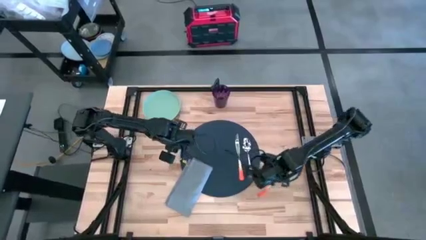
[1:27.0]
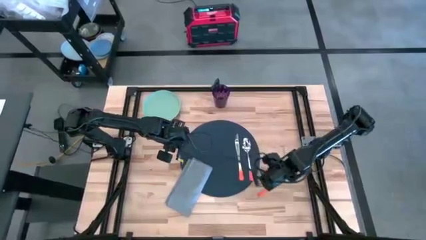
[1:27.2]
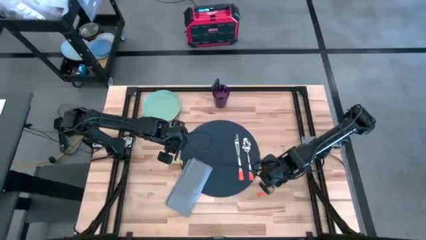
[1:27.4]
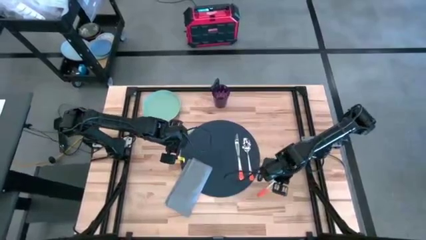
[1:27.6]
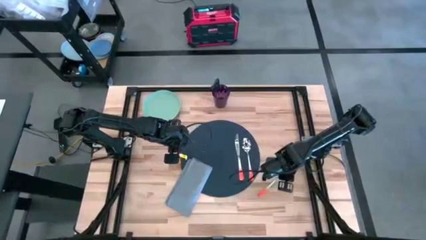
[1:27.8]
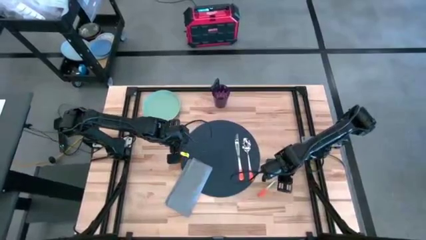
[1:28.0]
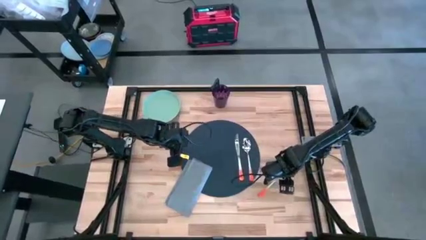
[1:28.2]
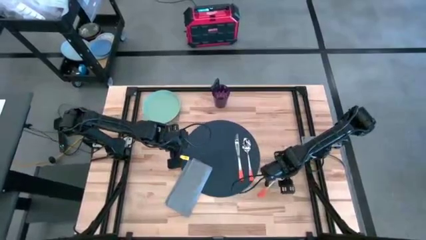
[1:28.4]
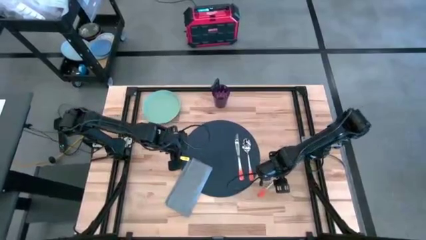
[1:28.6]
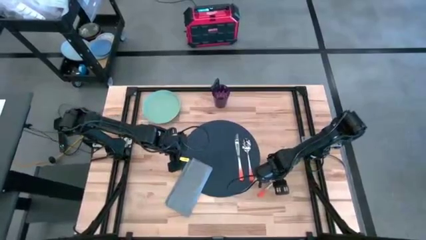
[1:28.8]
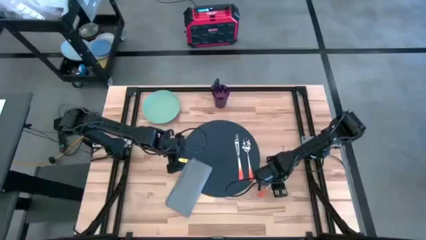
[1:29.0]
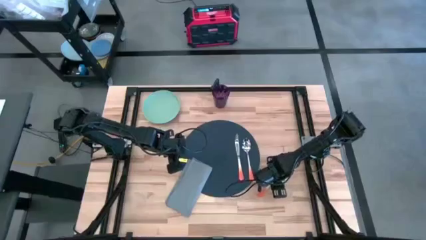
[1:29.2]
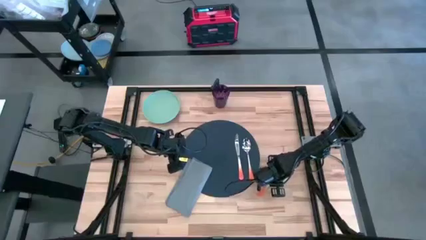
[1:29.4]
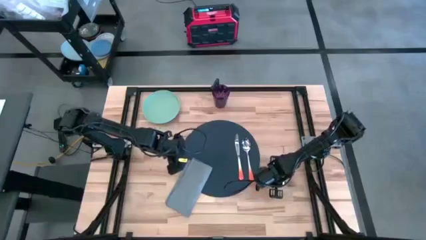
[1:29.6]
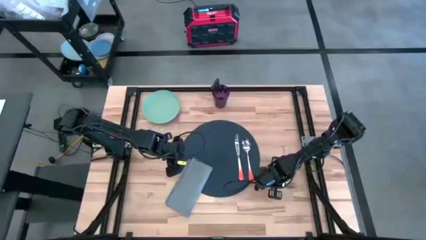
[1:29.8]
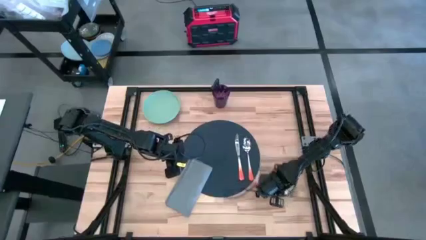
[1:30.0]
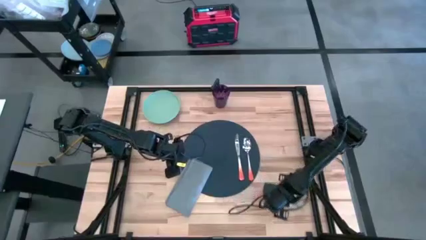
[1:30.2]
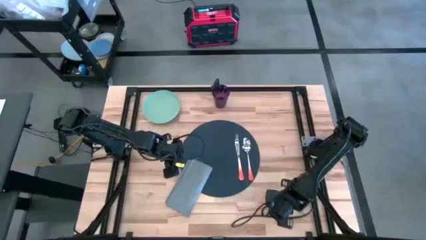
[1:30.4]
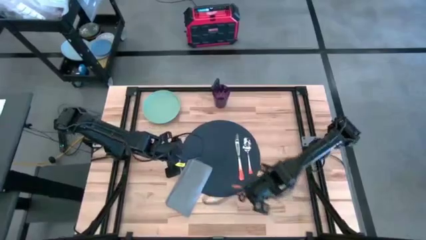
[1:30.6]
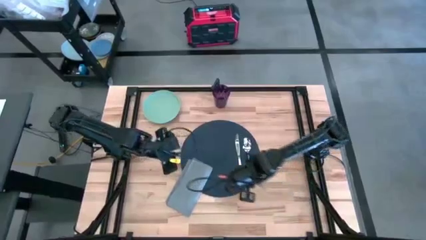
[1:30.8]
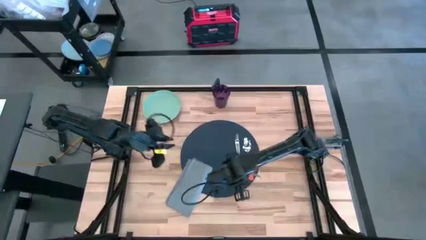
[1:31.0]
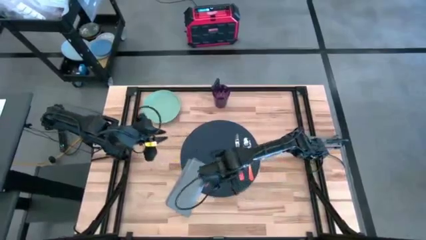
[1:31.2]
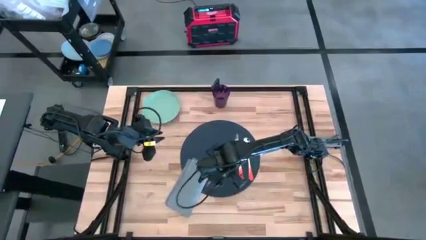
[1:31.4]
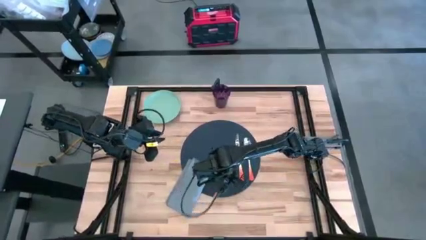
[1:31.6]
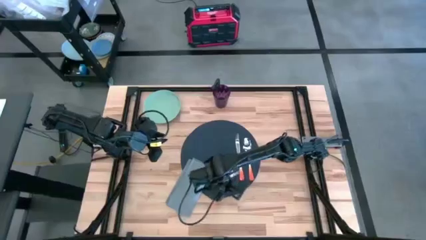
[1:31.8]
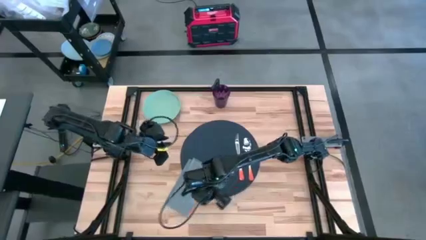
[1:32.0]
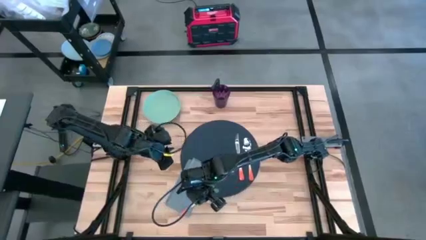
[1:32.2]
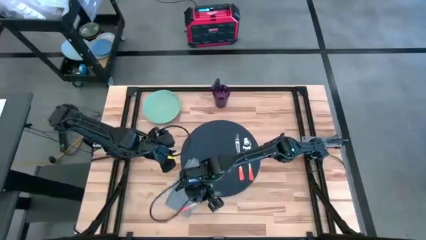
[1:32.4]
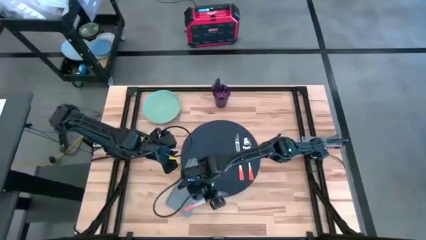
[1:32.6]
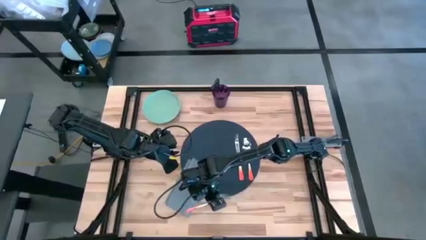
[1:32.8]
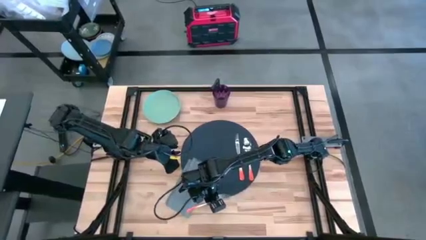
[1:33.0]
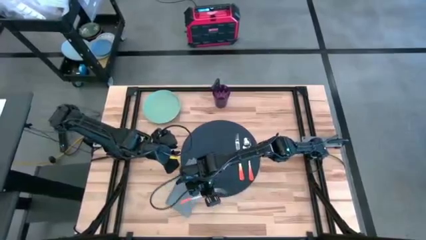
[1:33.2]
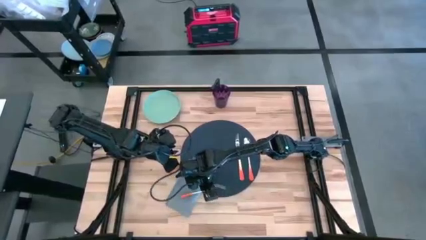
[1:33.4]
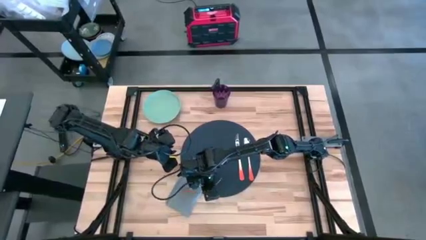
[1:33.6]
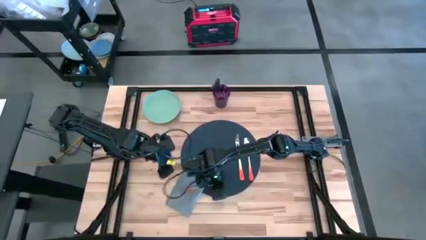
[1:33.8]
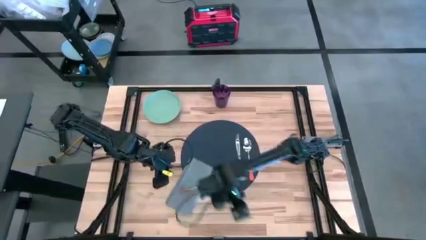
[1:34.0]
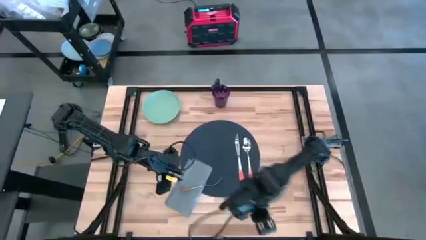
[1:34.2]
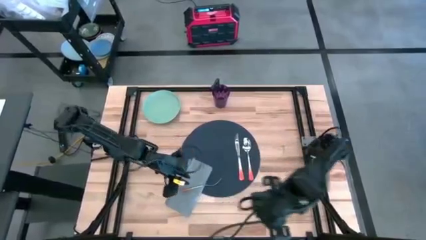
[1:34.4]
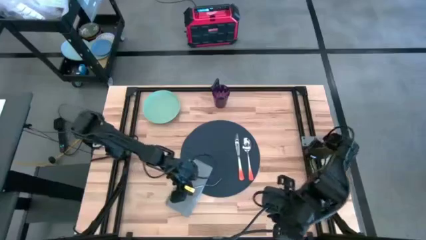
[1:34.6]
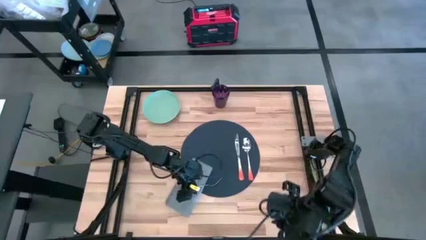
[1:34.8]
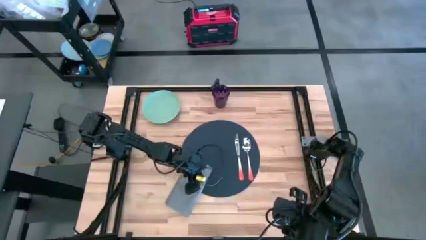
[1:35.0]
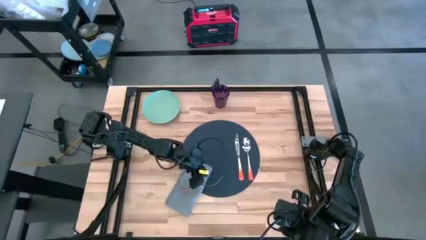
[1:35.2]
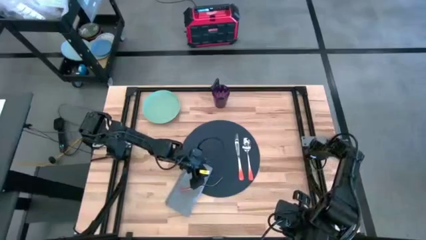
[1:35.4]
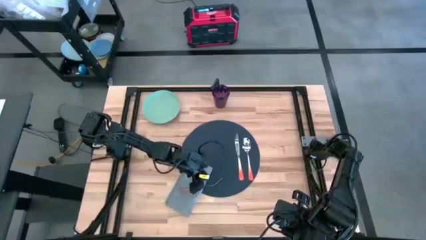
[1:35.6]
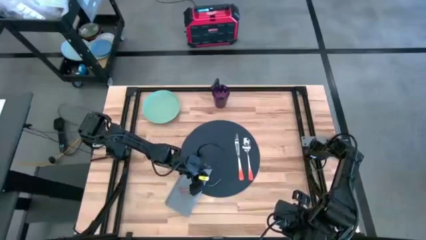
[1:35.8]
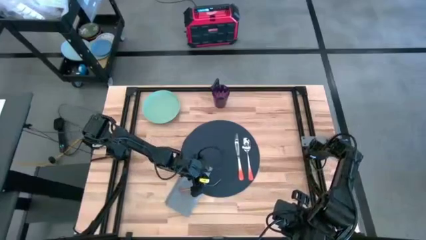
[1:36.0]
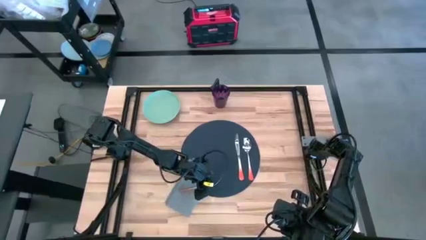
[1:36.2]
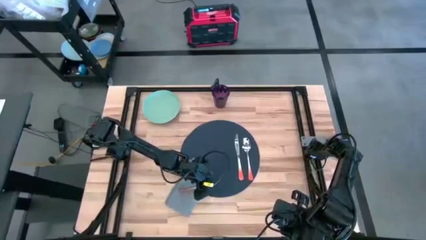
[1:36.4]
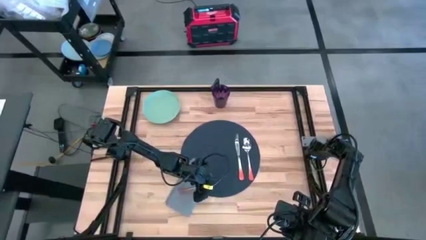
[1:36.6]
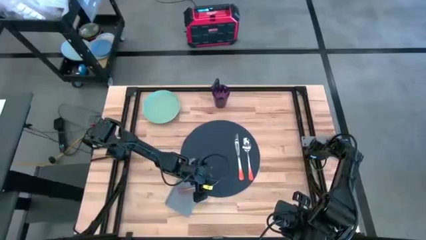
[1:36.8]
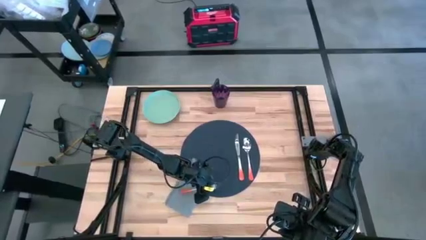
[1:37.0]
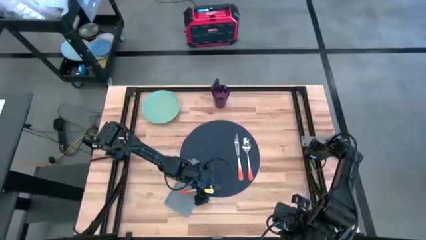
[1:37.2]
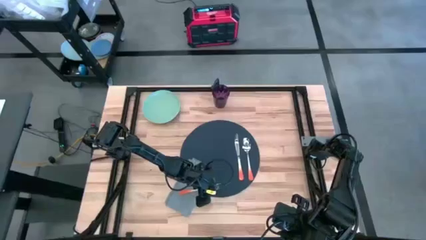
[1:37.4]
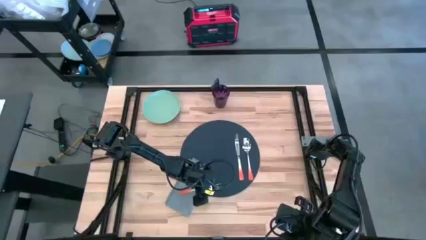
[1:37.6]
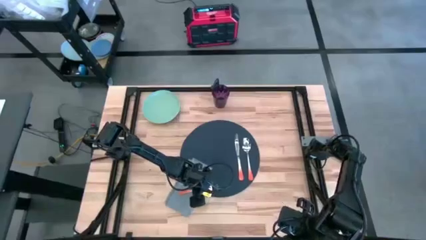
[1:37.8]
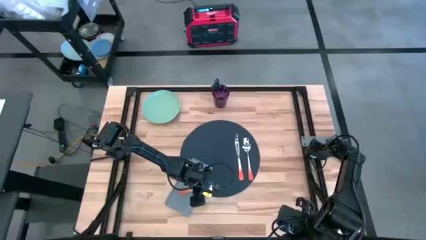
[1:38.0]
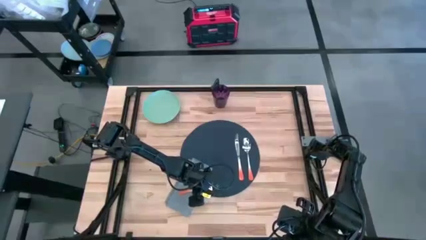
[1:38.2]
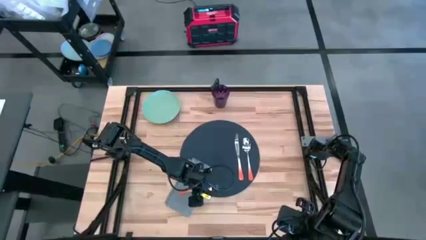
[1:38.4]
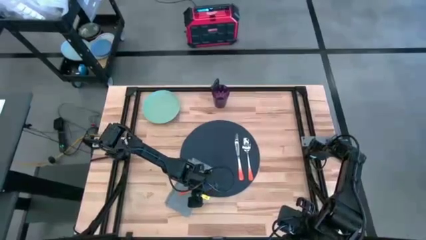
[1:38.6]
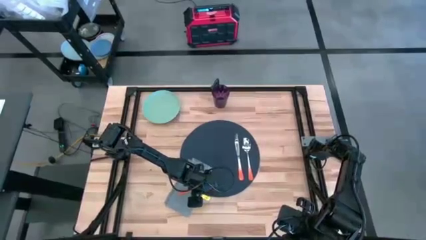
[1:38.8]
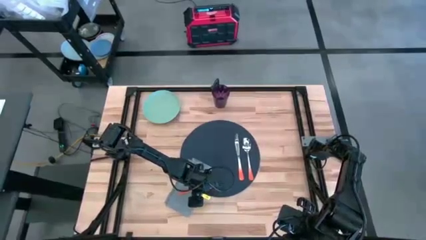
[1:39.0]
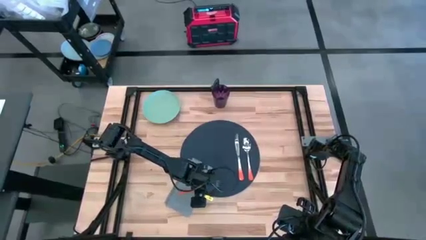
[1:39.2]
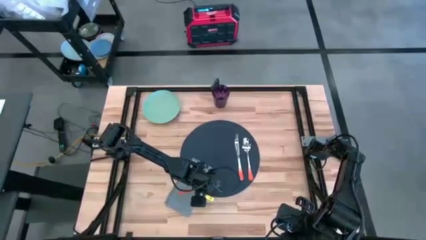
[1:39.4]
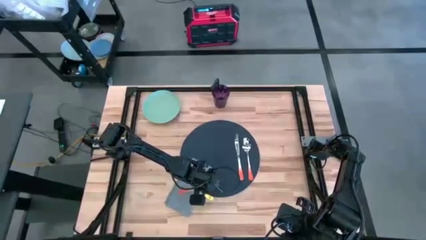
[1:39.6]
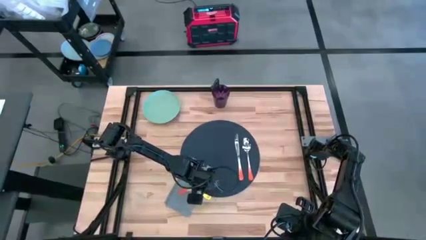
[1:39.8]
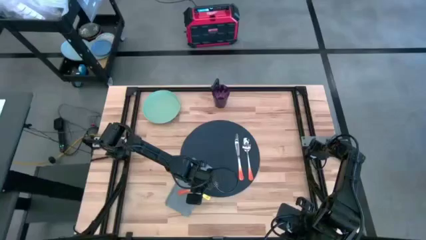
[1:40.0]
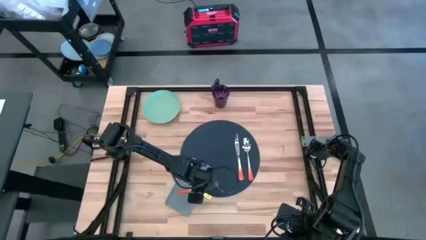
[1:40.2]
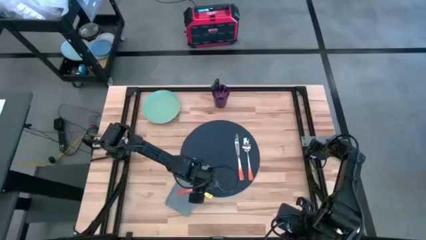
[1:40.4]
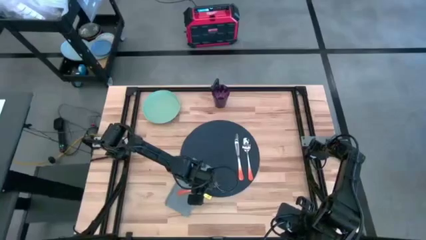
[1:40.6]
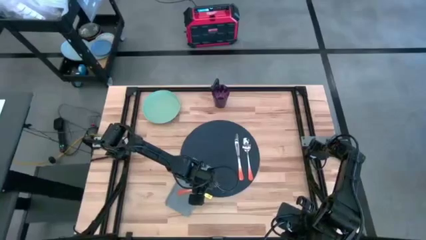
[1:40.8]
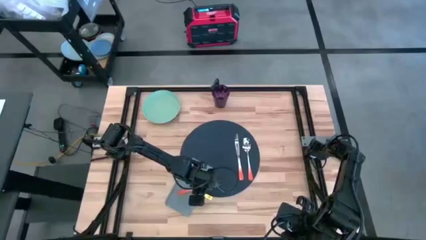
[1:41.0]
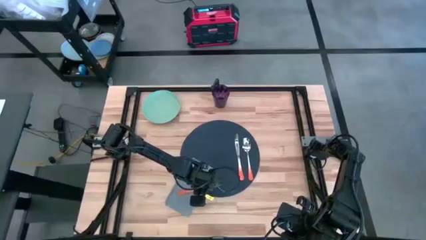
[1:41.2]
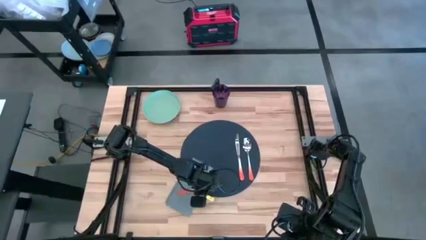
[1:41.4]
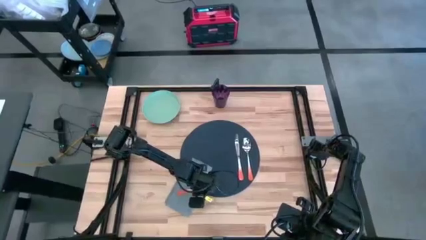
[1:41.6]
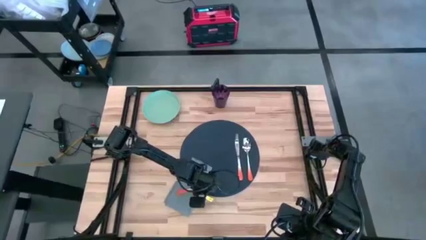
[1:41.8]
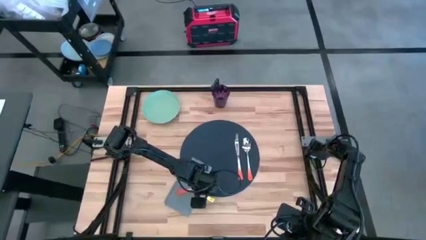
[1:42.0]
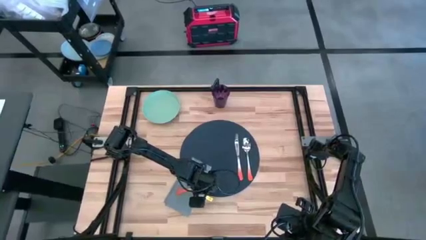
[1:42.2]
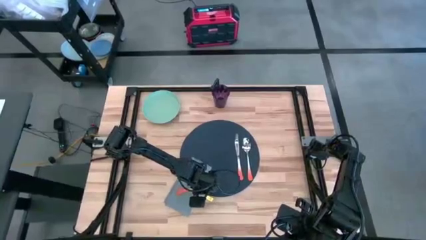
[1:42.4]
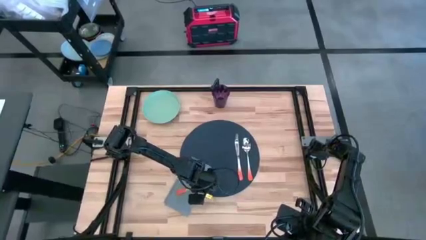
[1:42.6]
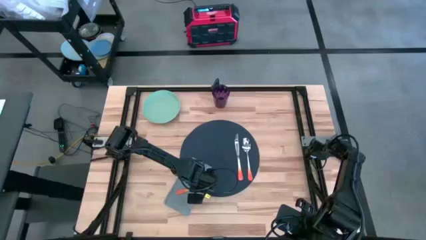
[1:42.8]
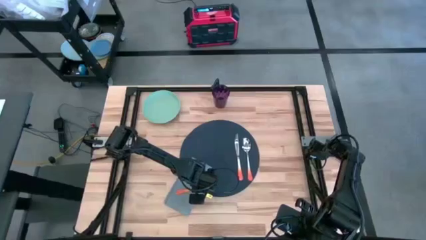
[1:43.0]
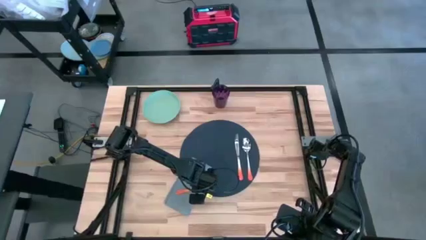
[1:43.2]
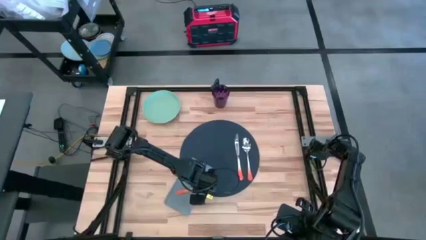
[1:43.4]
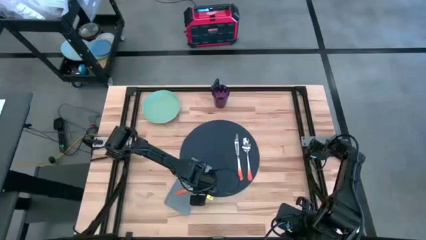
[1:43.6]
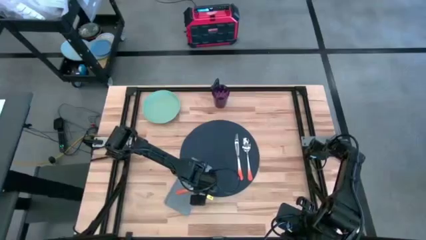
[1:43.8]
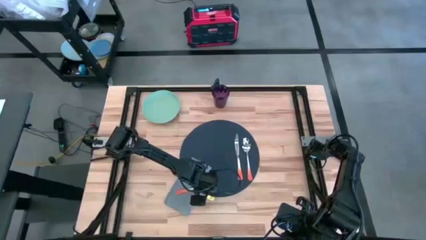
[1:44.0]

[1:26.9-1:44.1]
Task: Set table place
Put the orange fork on the table napkin
